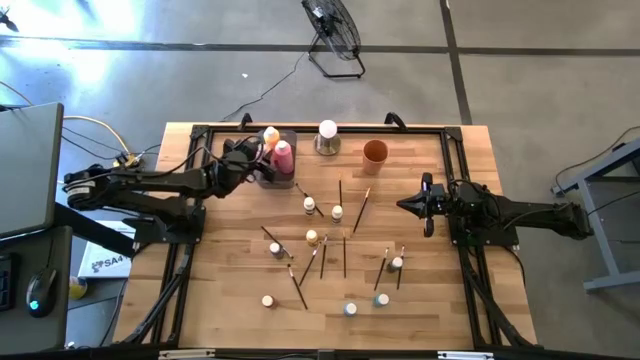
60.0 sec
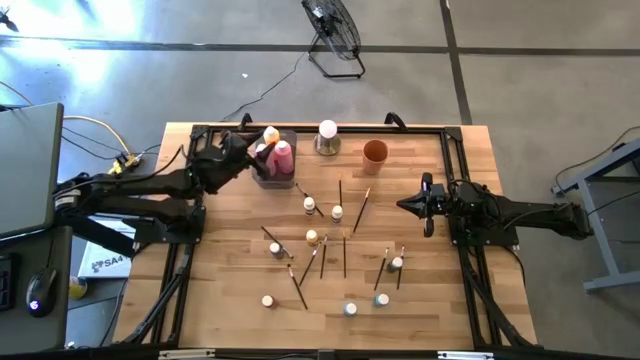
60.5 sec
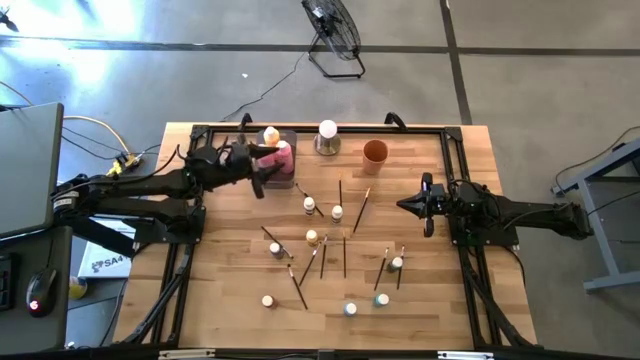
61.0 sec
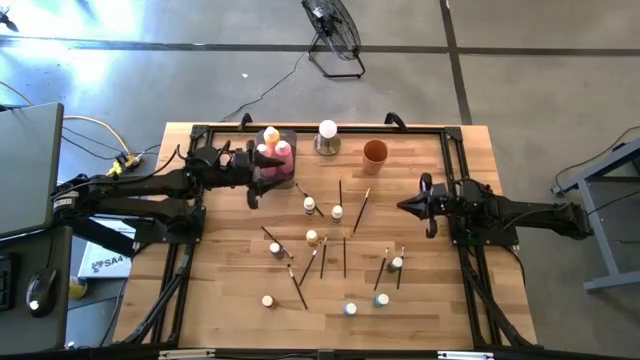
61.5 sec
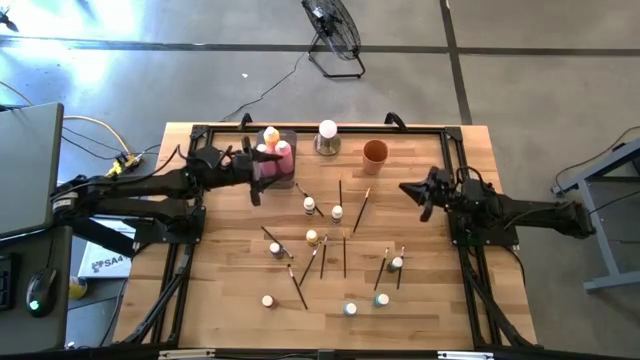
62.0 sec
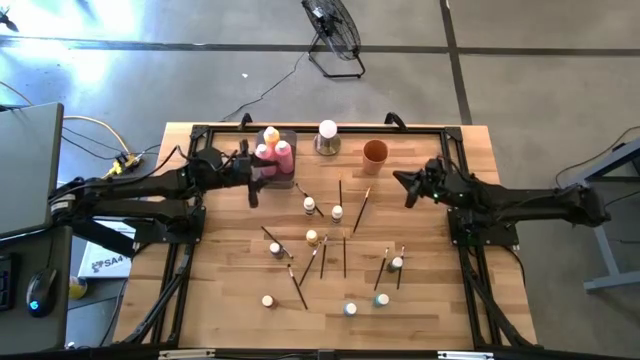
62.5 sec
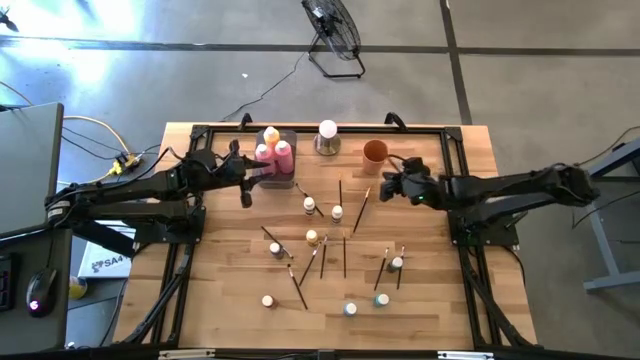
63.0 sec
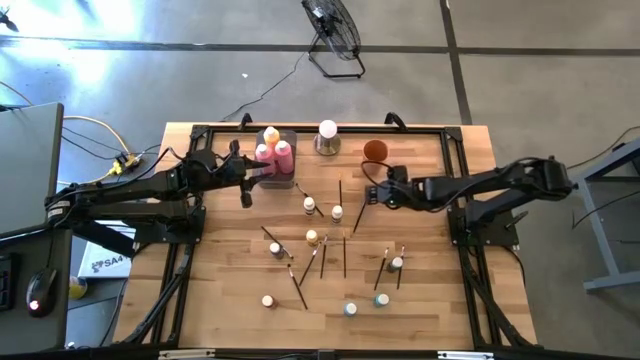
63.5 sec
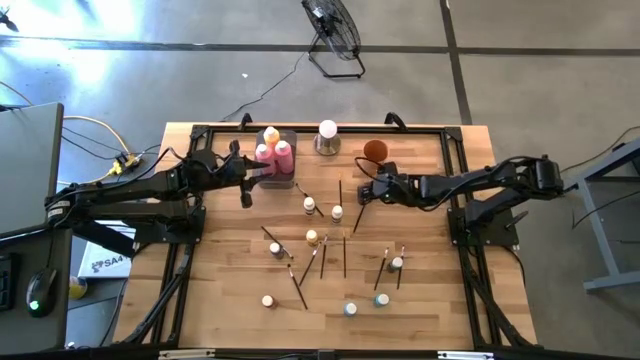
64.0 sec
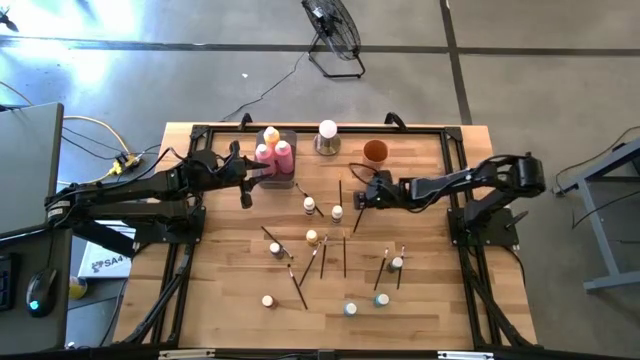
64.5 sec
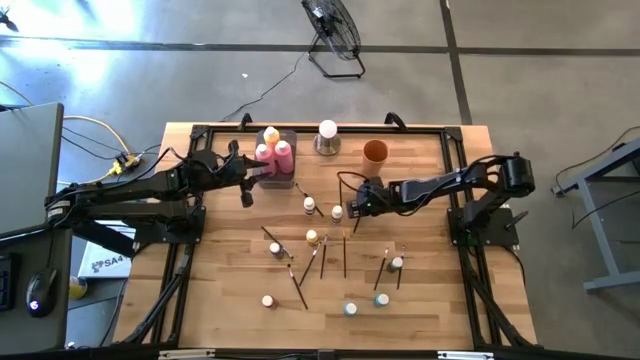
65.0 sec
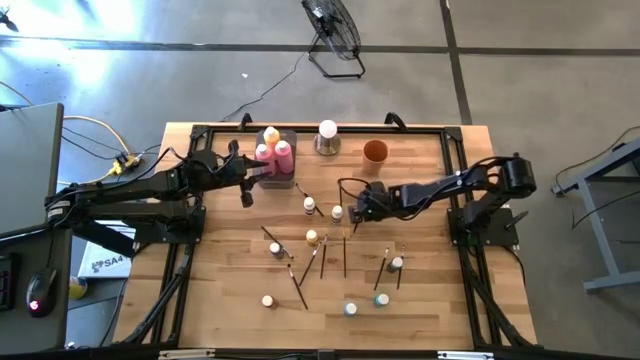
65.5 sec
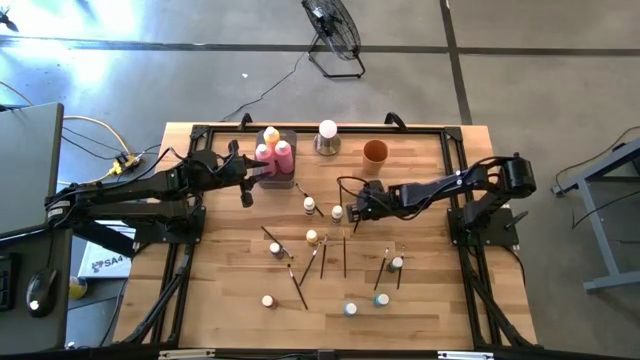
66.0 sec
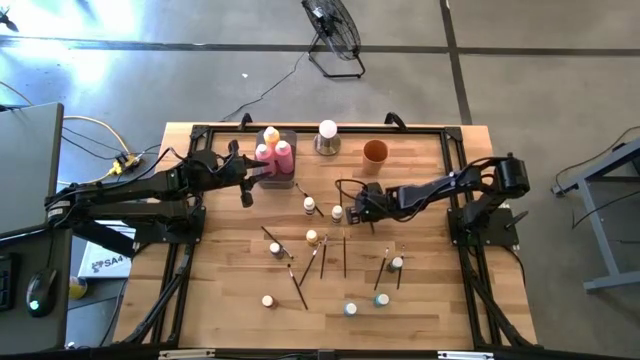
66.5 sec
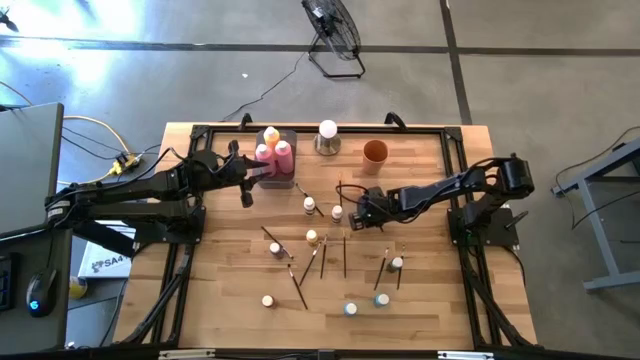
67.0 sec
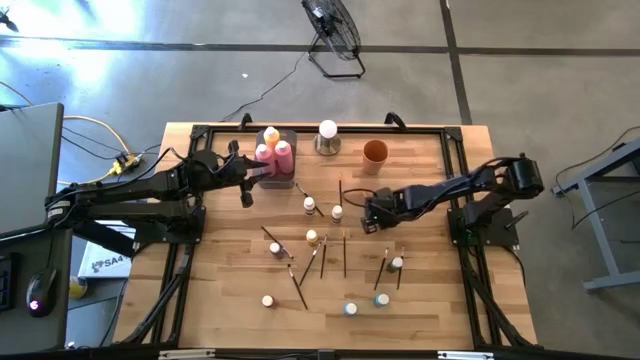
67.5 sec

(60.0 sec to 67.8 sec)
Task: Pick & Place Paint Supplies
Adjust the orange paintbrush

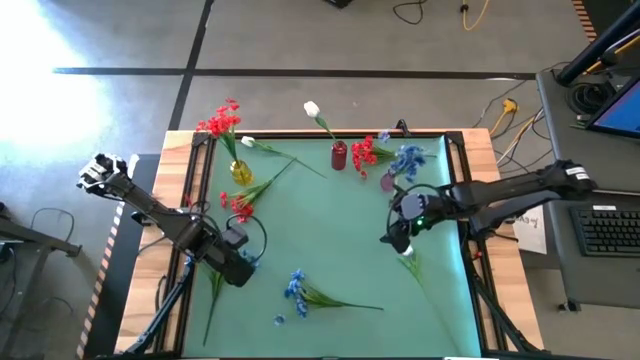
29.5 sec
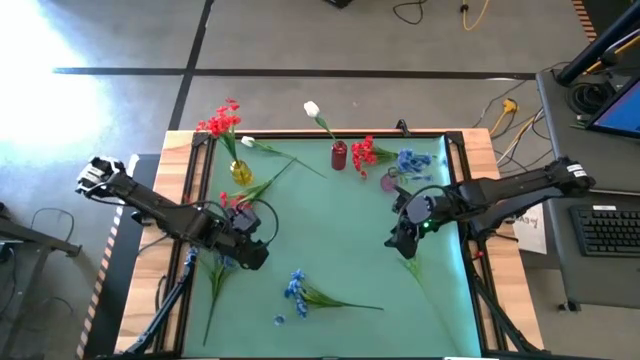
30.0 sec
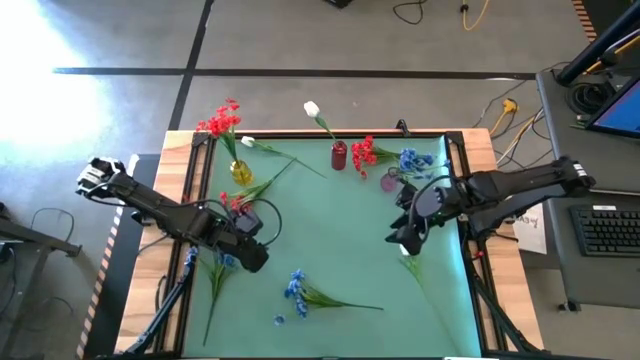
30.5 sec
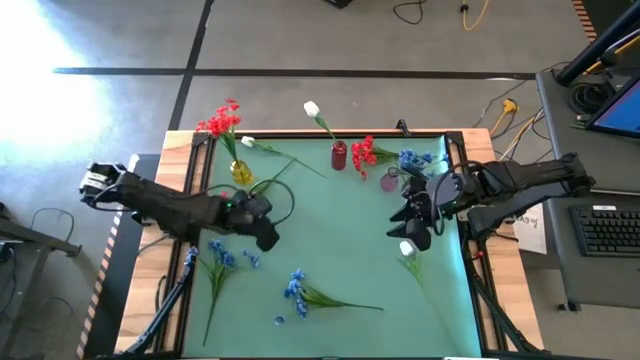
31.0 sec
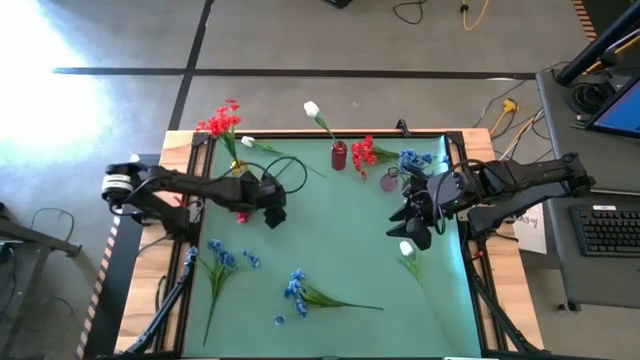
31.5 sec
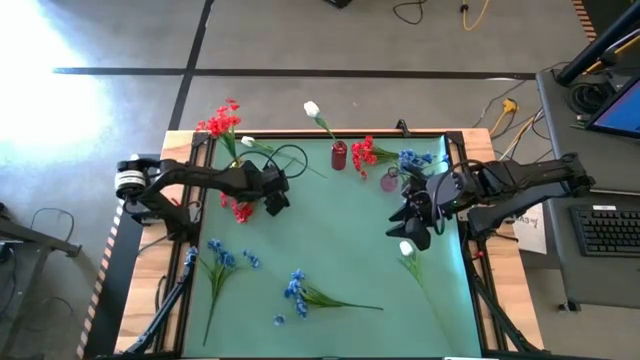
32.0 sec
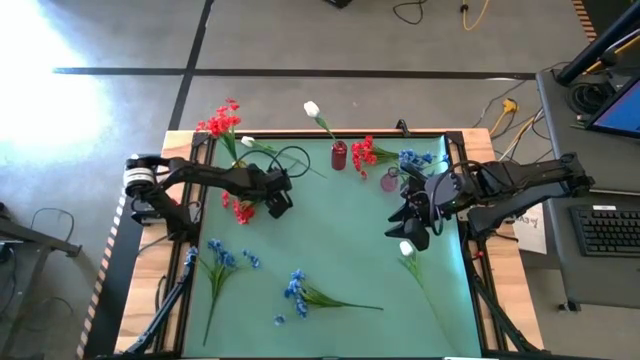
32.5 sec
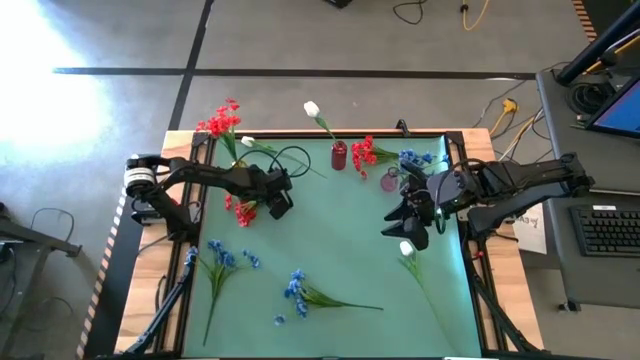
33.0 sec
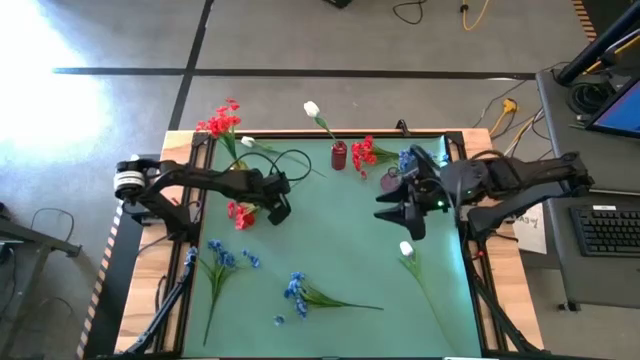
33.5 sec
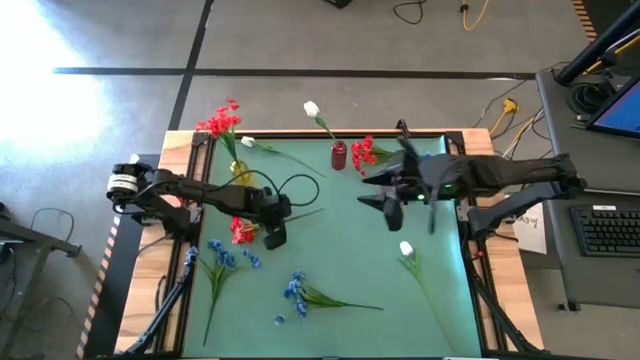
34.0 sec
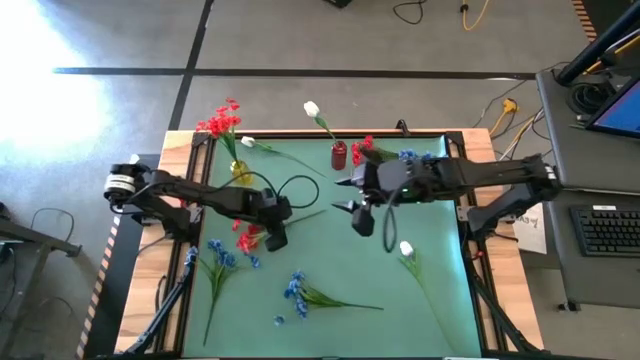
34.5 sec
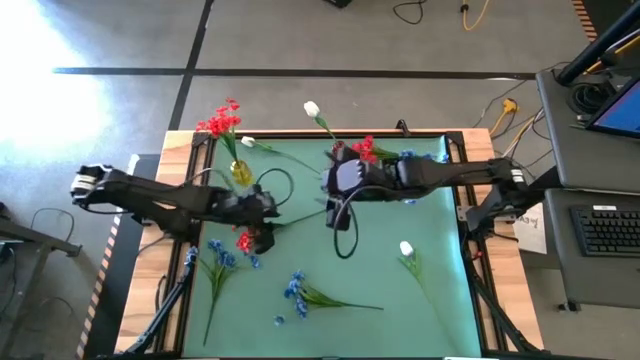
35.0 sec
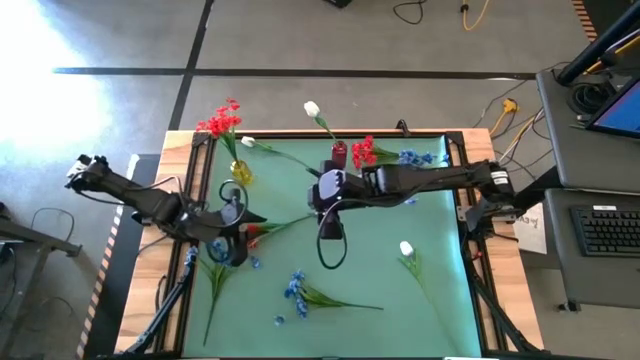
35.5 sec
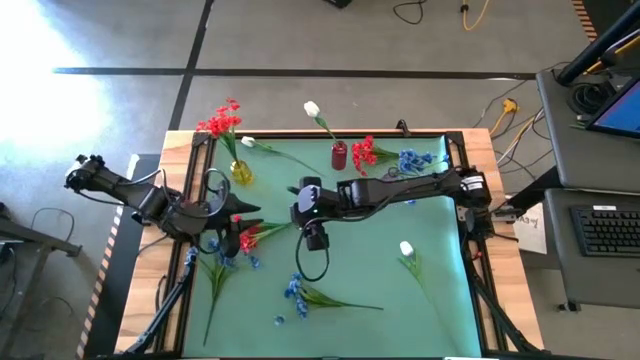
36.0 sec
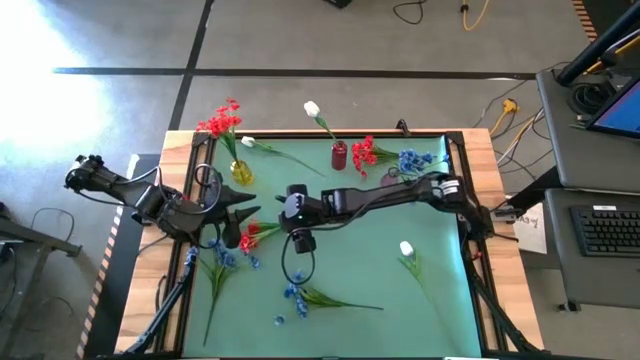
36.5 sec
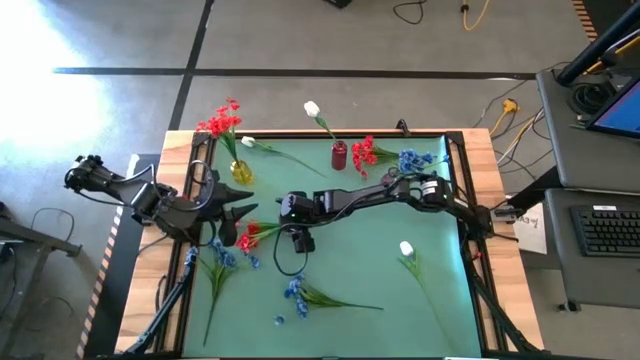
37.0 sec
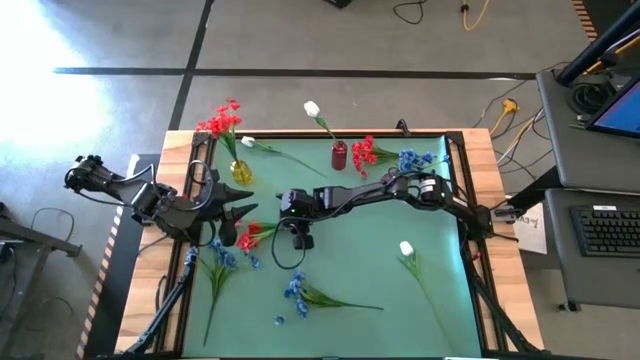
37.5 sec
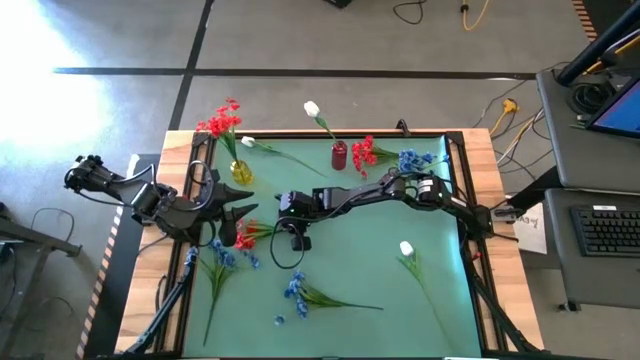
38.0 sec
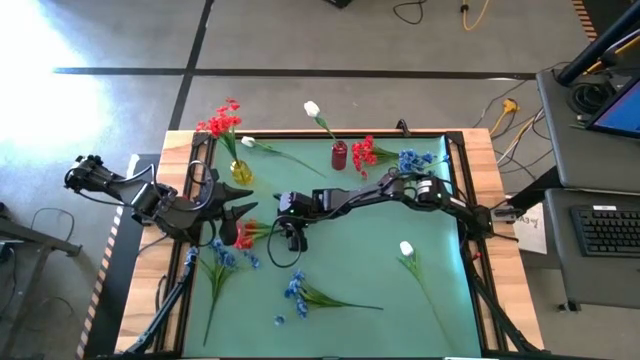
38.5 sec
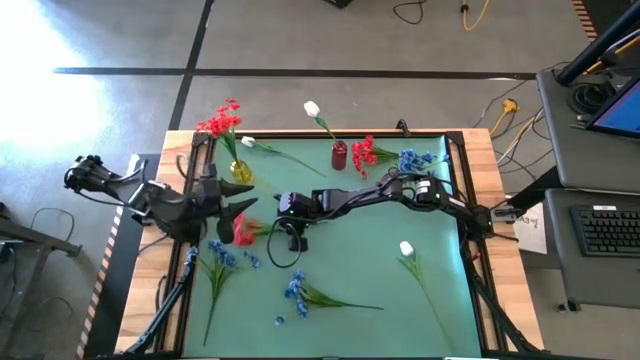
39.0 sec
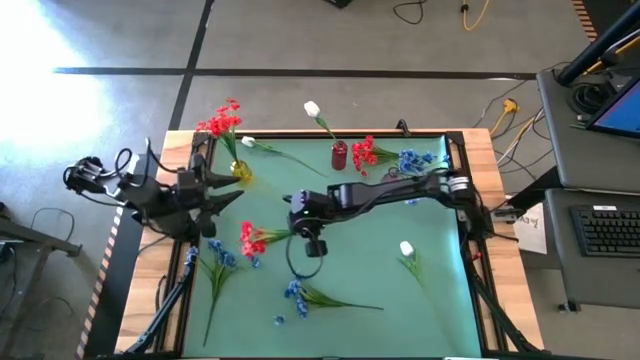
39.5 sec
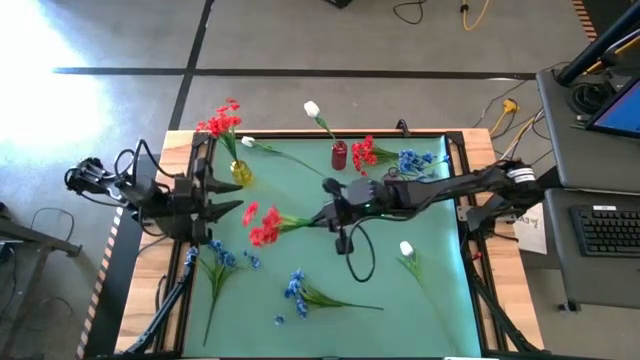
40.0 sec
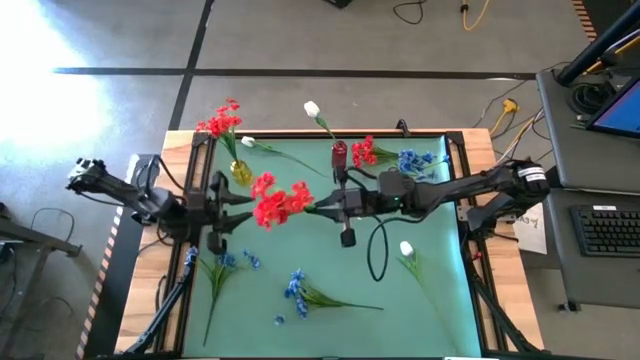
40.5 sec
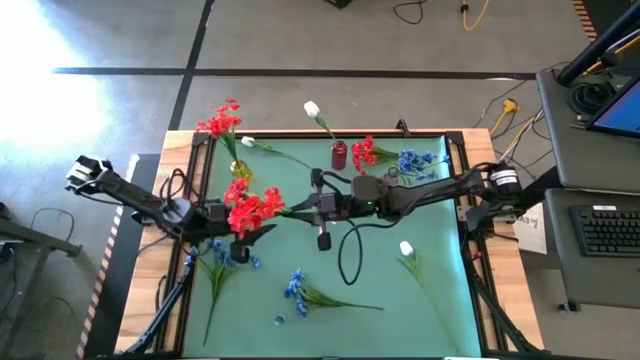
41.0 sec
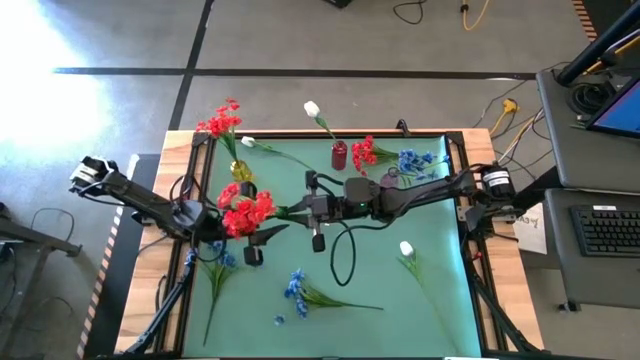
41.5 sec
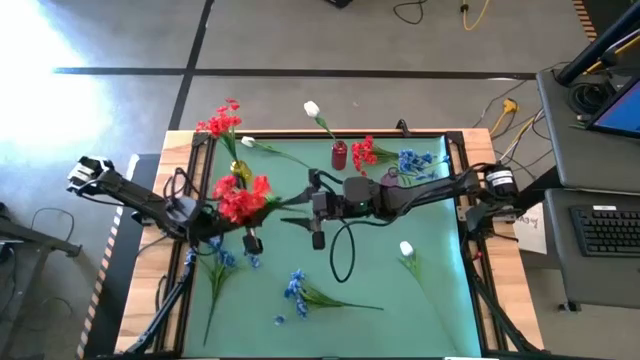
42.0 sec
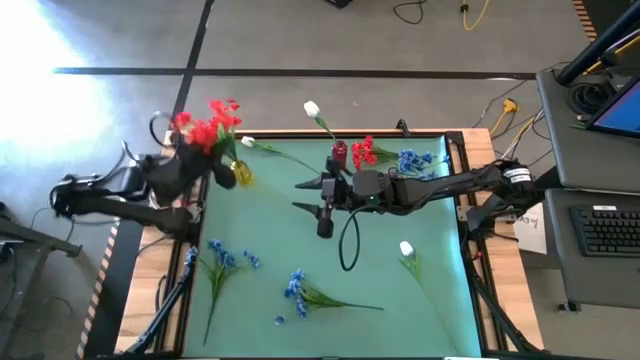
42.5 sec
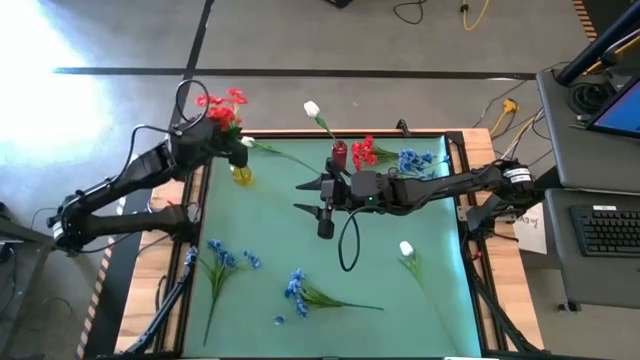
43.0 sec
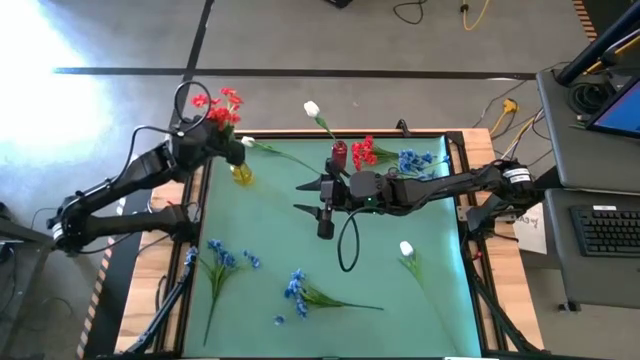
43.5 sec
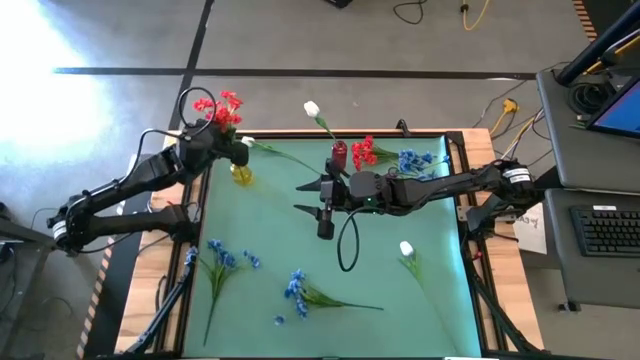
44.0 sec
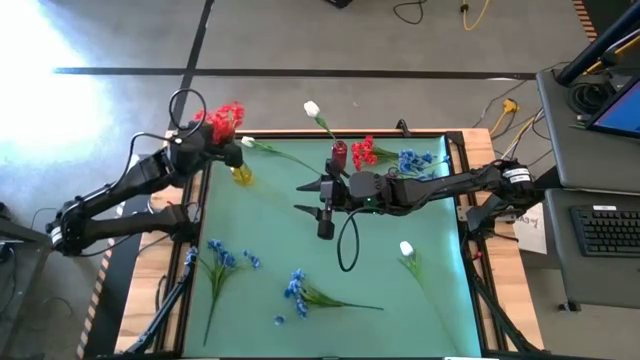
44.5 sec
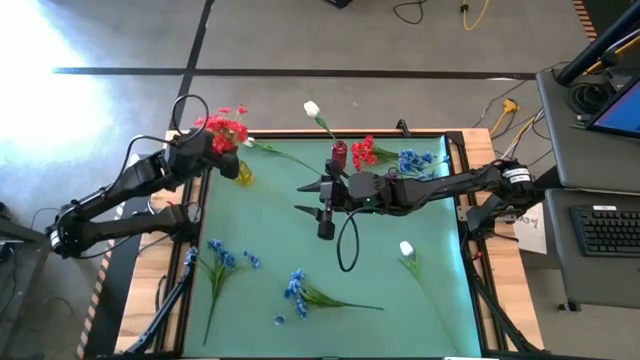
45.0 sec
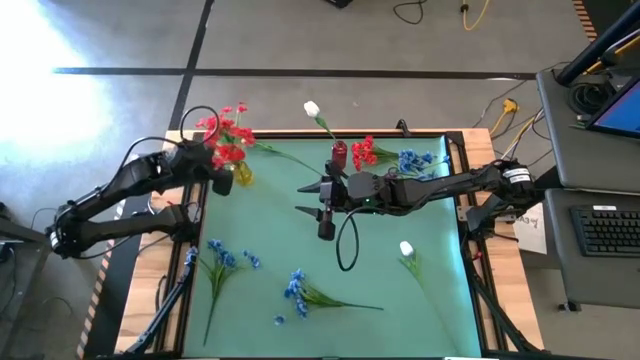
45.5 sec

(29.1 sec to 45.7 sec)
Task: Sort flowers into vase by color
Put the left red flower into the yellow vase
